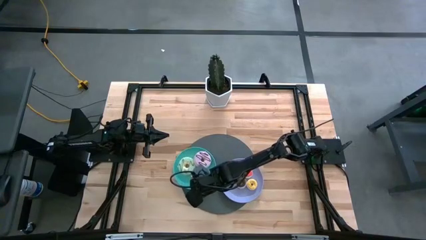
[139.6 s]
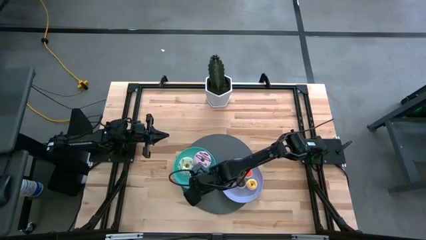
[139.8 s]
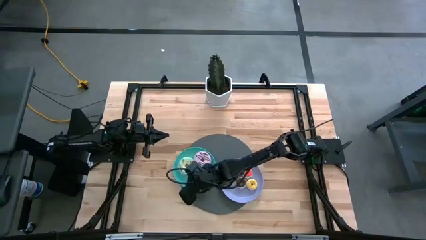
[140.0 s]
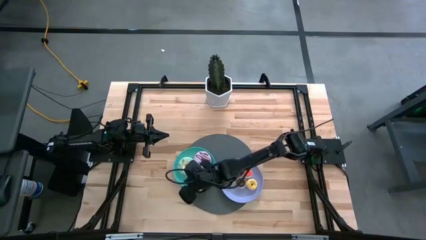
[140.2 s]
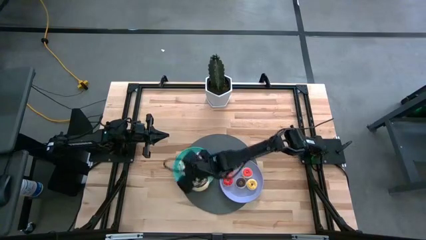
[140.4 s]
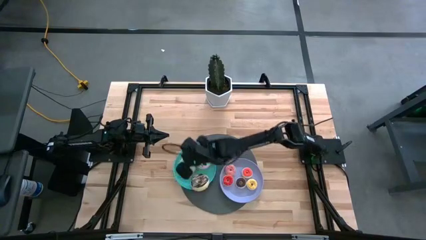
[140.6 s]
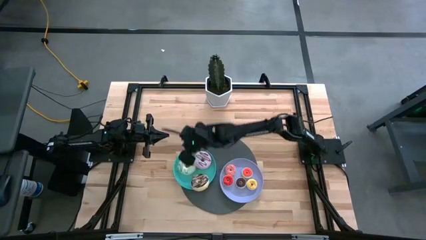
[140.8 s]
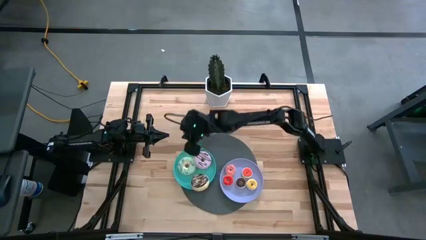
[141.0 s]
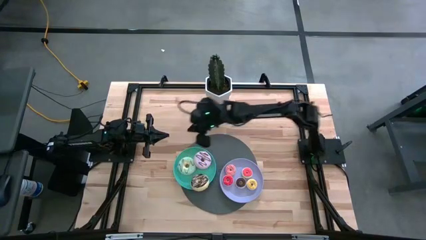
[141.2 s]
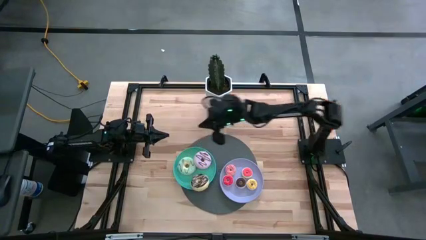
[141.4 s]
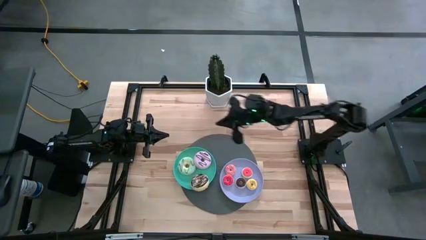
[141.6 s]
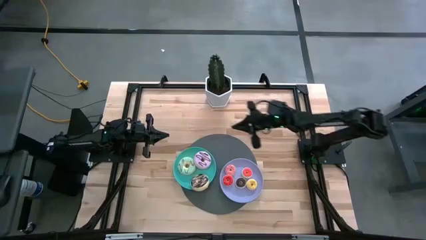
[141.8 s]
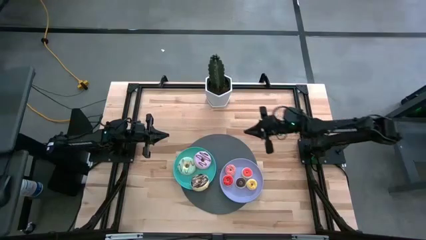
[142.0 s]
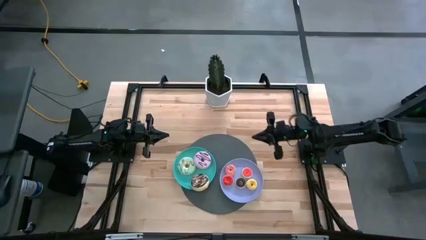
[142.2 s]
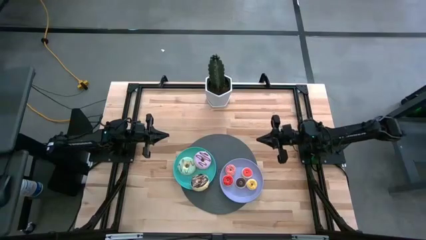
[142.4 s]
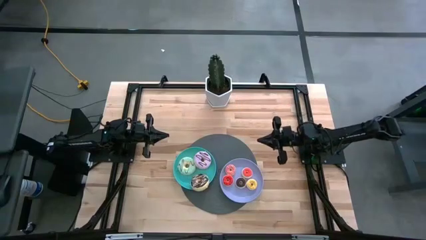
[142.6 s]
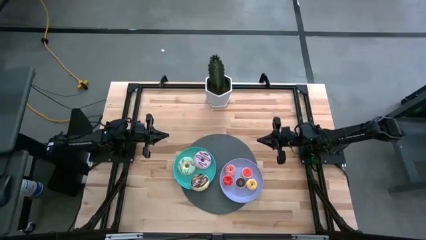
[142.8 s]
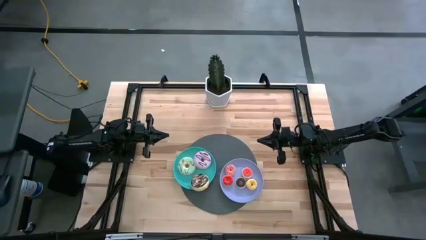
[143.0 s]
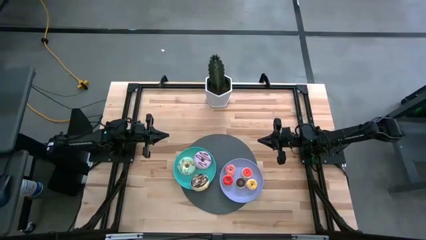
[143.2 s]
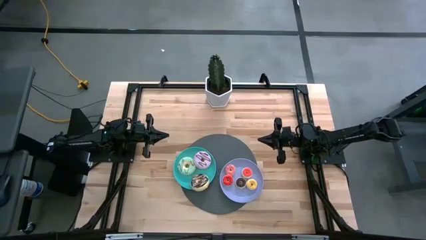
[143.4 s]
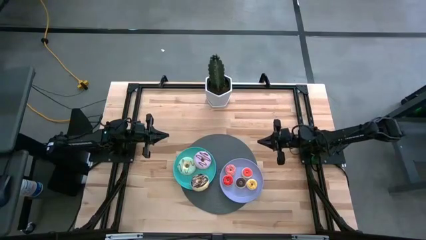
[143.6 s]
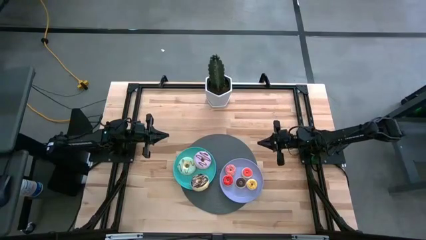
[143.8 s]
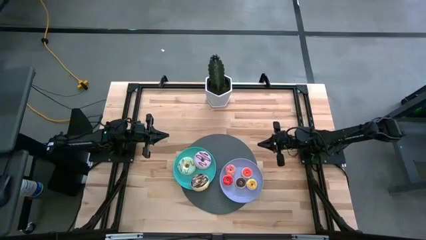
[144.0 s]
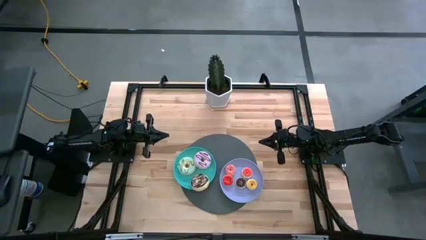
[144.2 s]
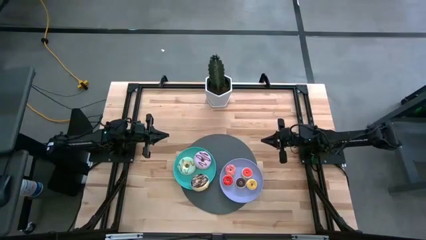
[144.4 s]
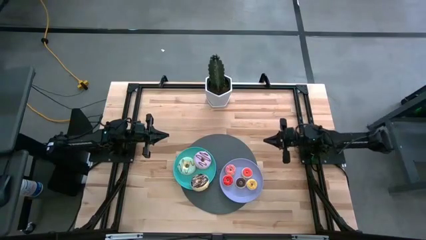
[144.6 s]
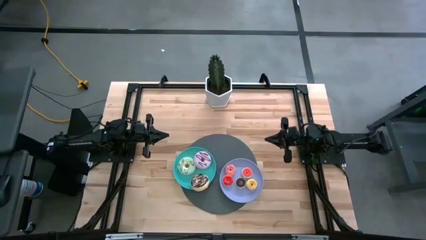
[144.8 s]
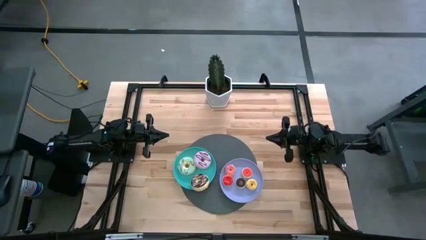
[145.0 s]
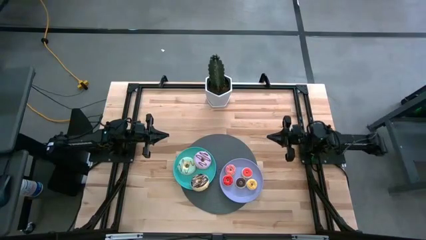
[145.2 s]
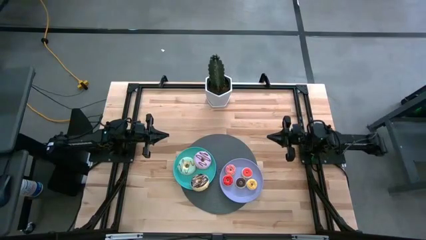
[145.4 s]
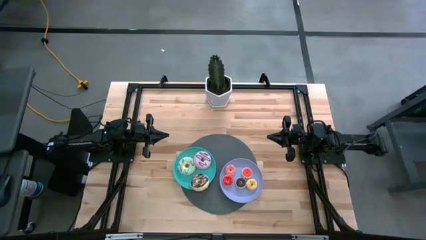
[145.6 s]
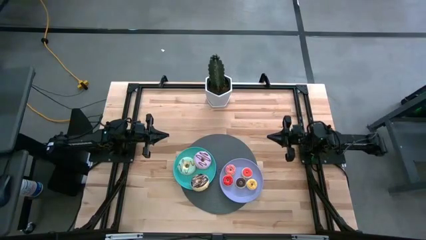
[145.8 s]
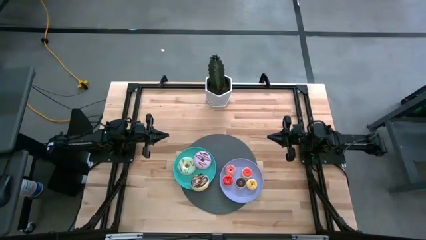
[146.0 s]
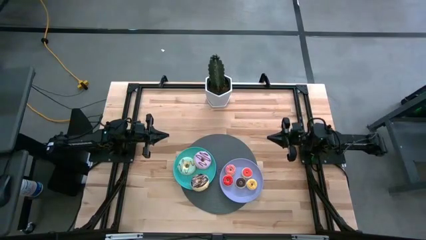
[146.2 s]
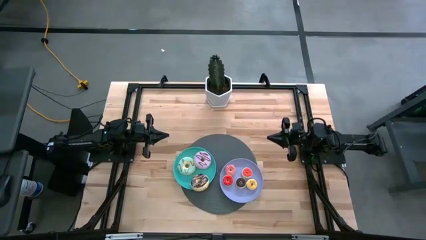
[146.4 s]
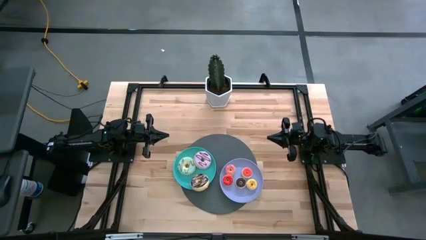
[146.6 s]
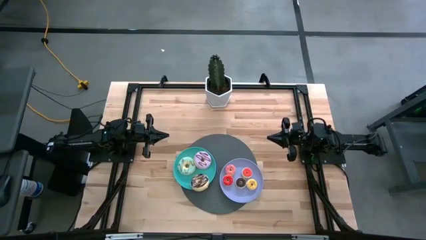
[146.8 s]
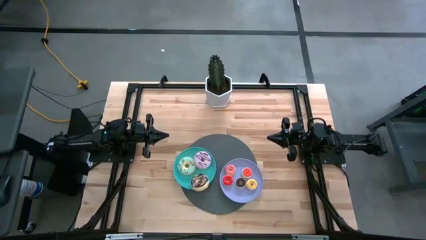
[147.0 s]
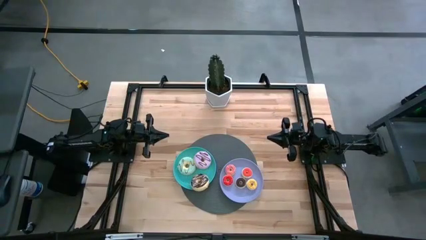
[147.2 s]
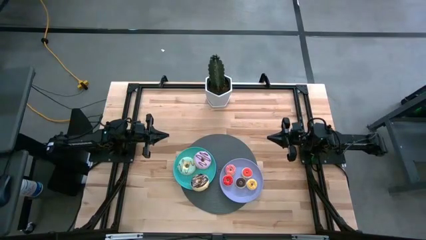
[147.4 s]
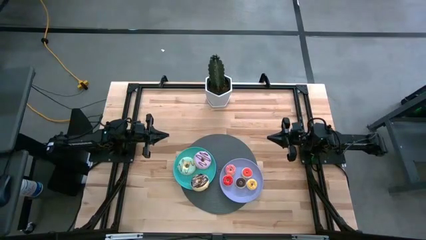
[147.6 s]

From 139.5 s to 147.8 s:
Task: Pick & Place donuts
Return to Home Position

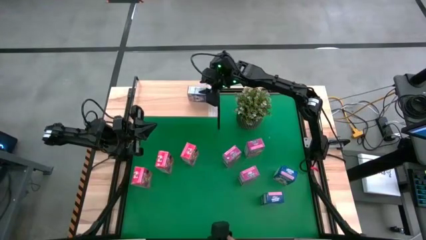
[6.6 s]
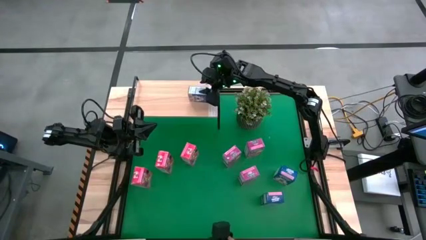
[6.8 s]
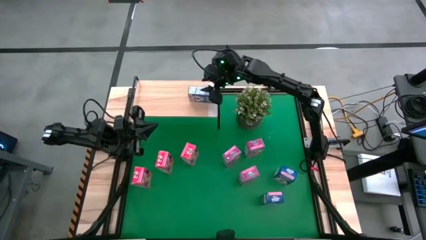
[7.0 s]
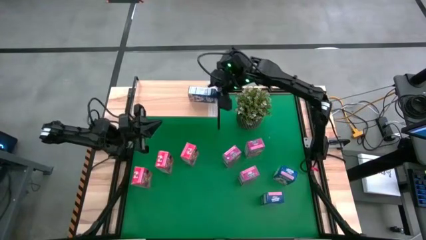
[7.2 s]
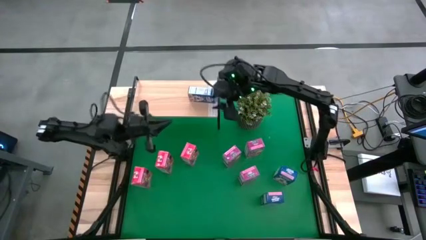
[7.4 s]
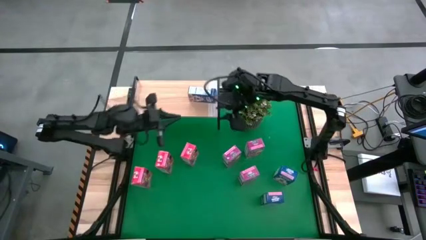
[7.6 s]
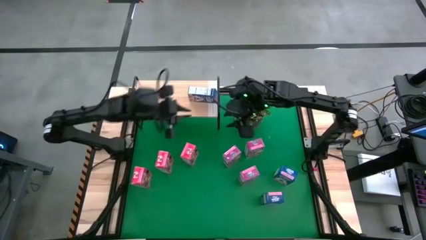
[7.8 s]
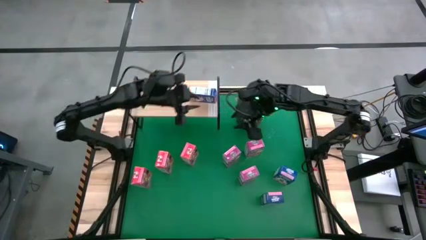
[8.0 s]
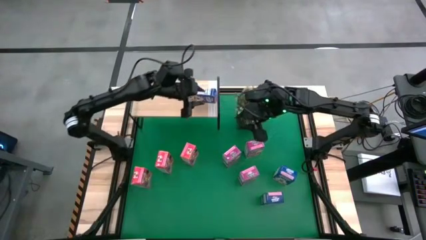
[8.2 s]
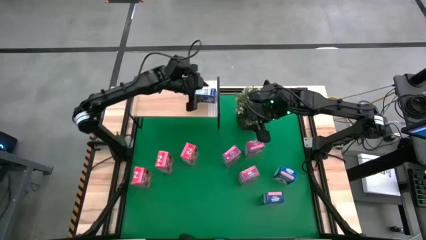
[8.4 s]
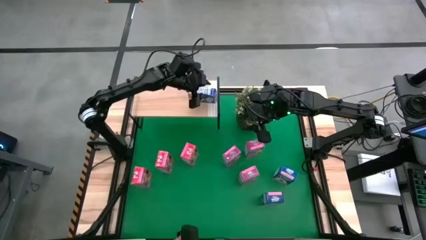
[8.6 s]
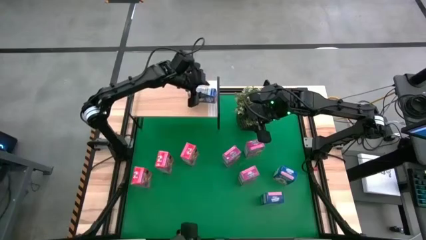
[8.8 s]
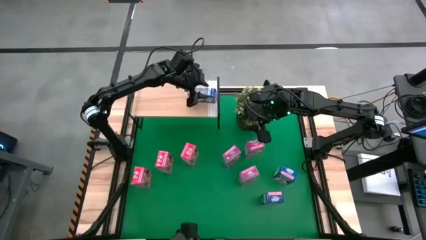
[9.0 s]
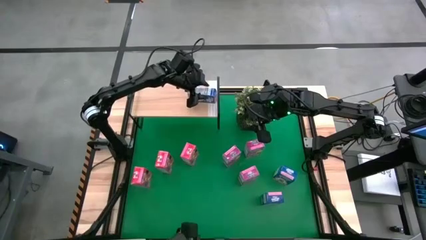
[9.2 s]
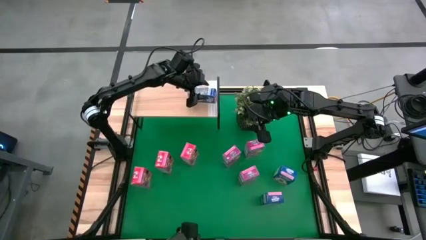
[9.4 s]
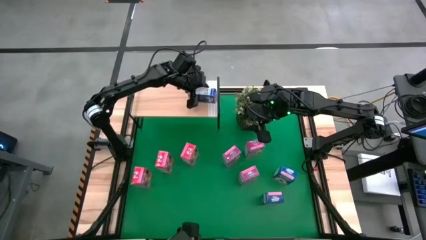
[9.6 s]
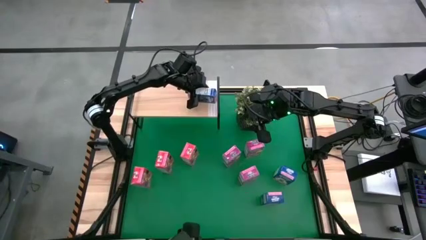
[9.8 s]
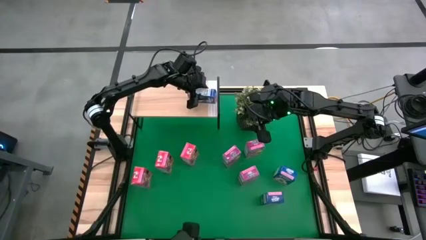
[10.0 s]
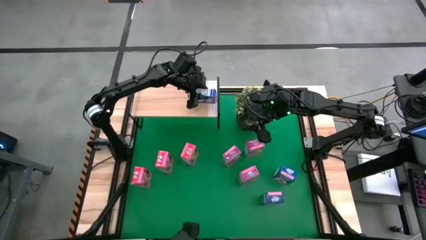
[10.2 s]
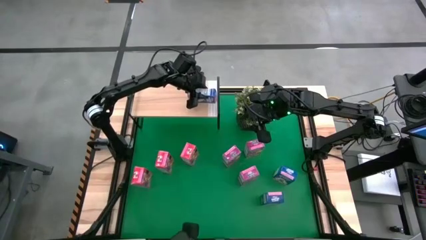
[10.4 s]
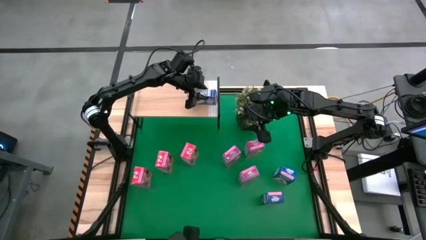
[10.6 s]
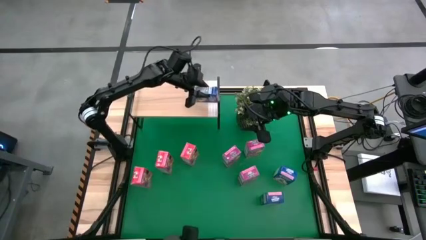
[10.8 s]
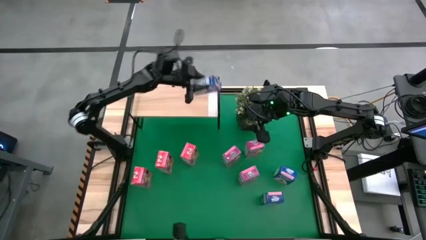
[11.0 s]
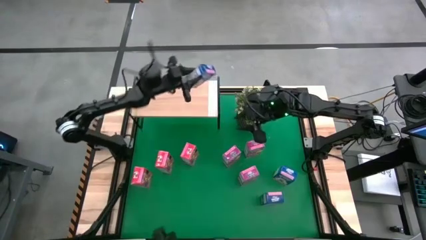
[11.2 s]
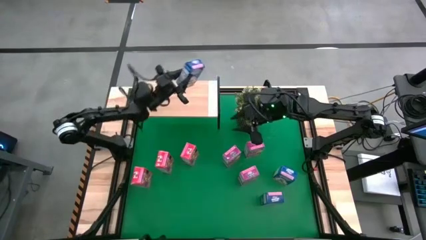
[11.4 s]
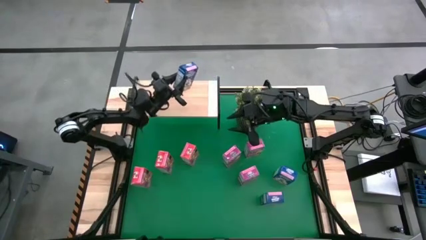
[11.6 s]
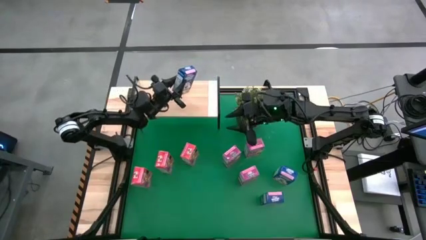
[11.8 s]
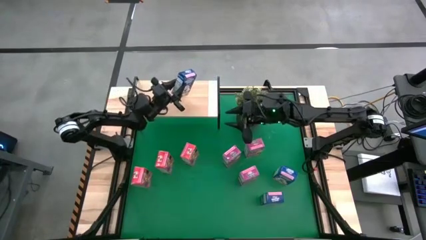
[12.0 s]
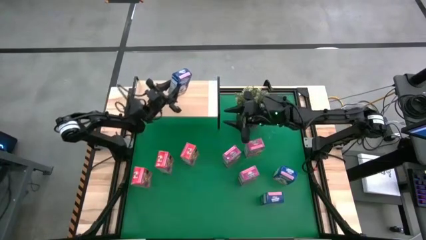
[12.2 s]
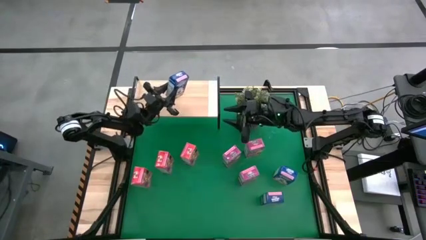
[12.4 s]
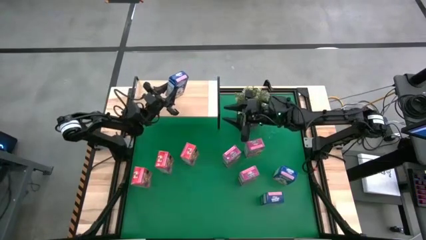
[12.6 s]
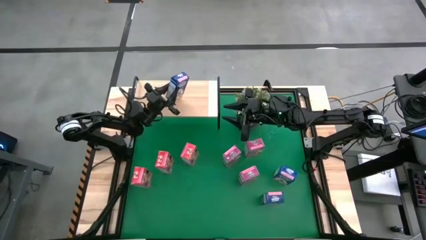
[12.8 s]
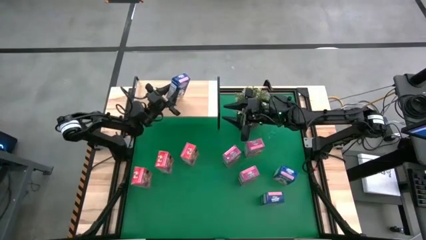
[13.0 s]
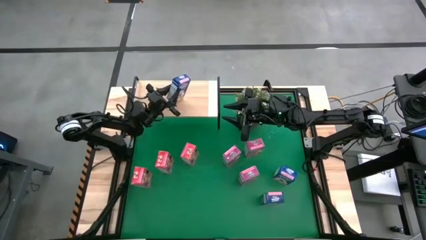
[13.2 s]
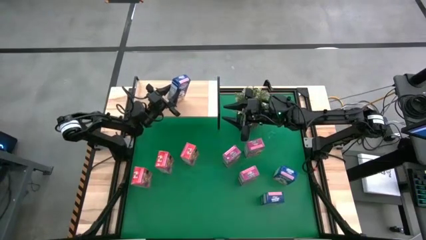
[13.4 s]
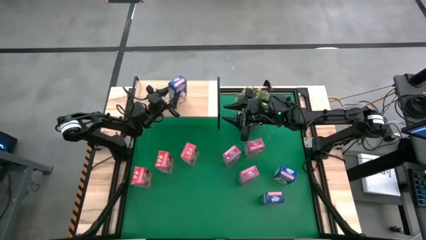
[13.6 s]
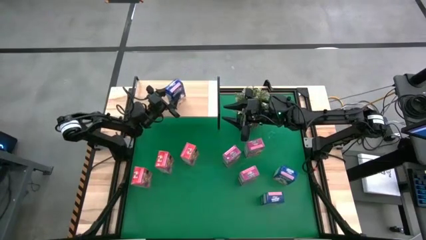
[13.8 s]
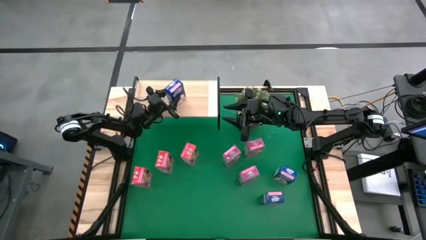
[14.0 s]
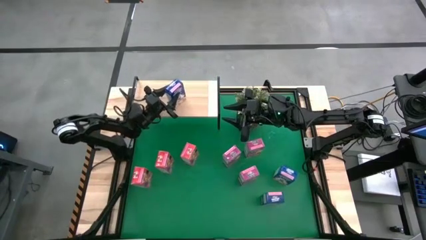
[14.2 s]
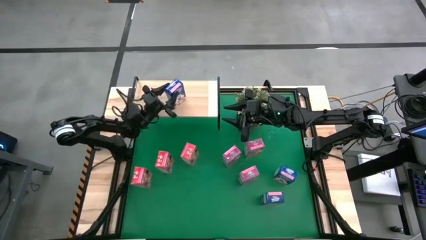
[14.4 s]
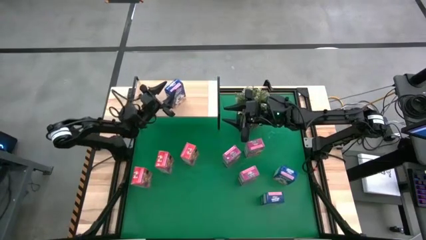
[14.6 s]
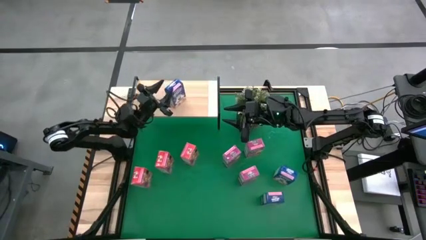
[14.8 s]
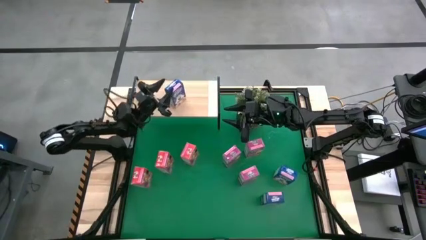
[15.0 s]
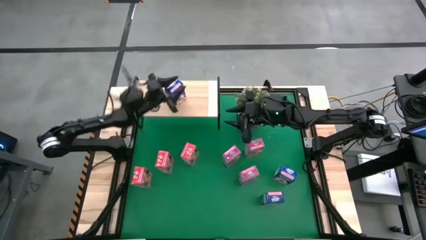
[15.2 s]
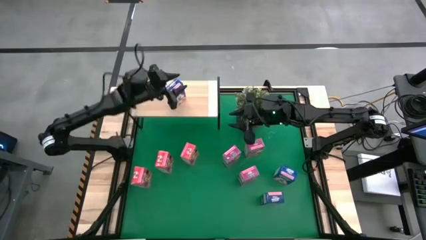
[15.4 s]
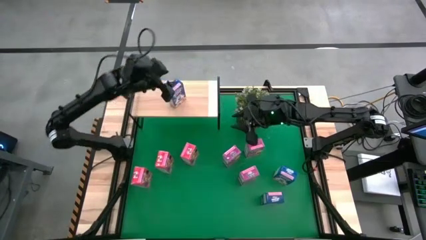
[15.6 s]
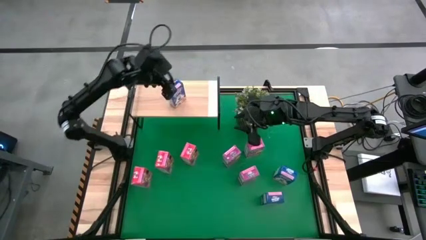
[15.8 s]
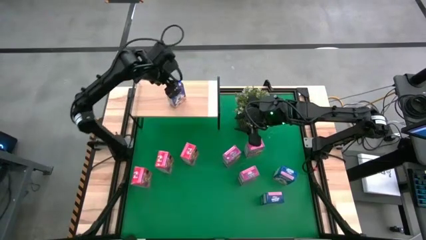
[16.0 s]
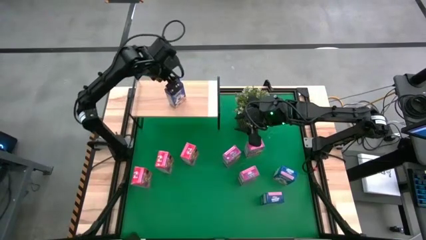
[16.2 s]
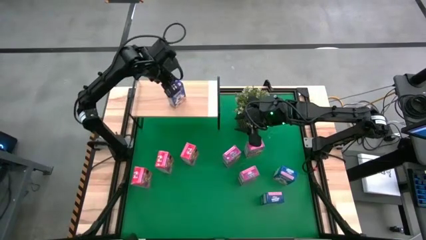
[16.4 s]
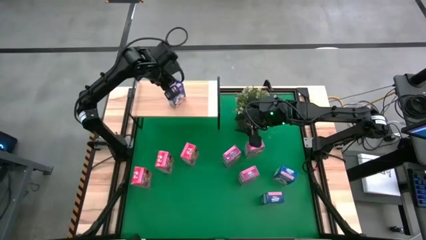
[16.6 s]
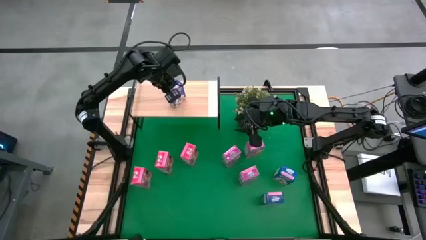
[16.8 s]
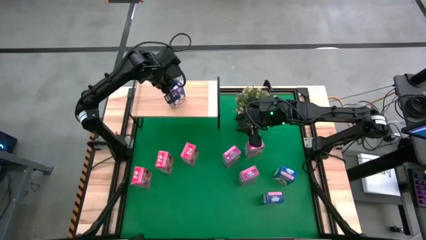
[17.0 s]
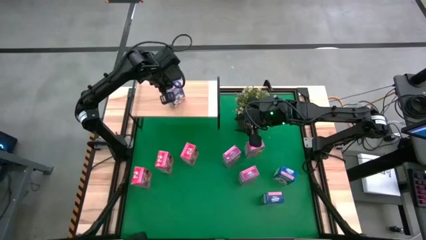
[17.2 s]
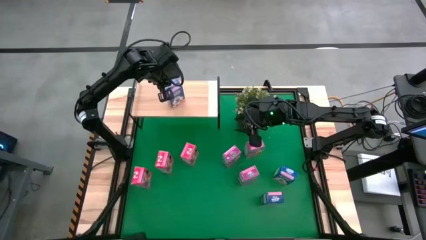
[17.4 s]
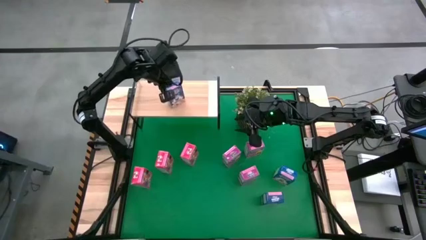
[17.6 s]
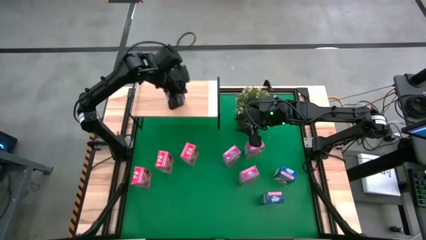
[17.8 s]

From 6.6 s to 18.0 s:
Task: Stack cereal on shelf
Put the left blue cereal box on the shelf
